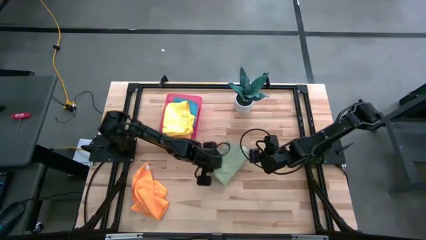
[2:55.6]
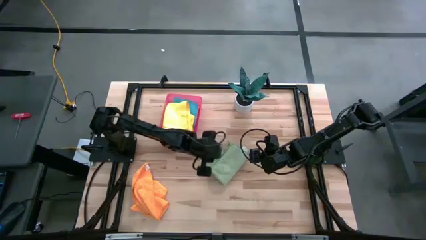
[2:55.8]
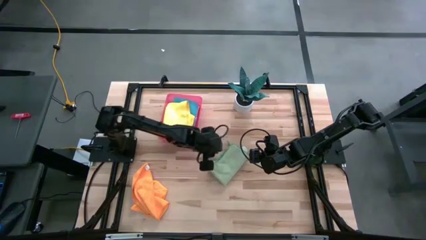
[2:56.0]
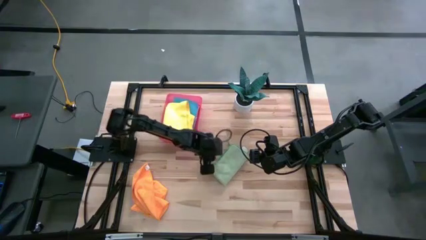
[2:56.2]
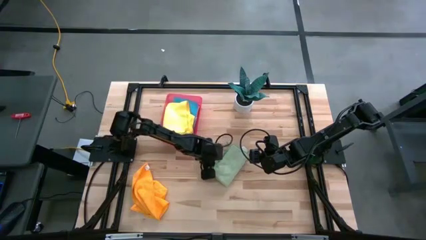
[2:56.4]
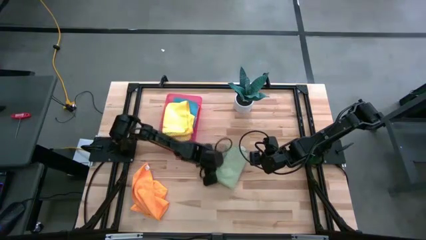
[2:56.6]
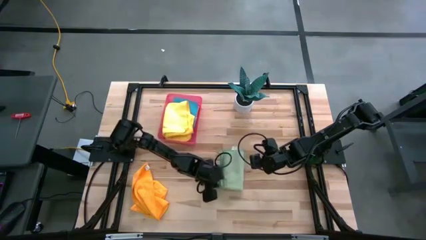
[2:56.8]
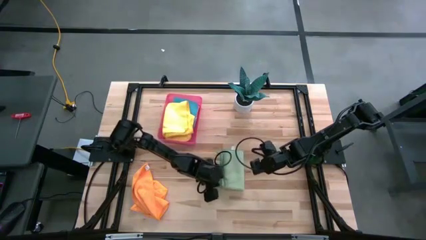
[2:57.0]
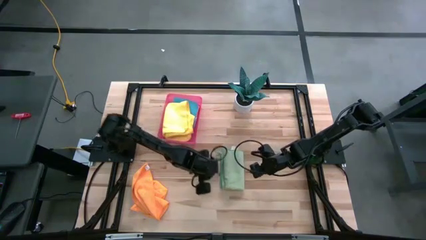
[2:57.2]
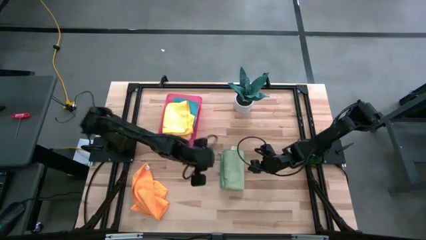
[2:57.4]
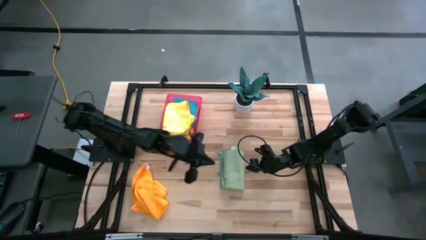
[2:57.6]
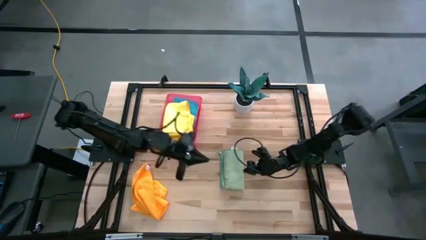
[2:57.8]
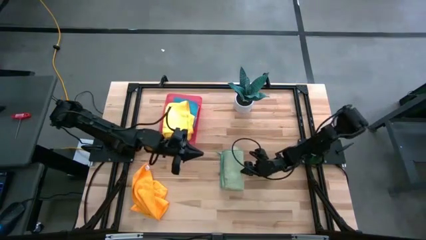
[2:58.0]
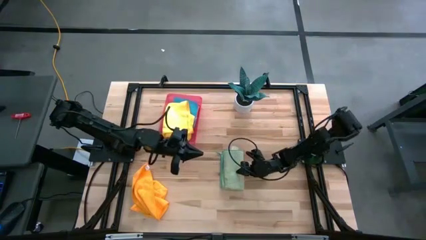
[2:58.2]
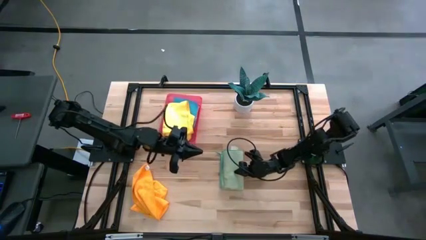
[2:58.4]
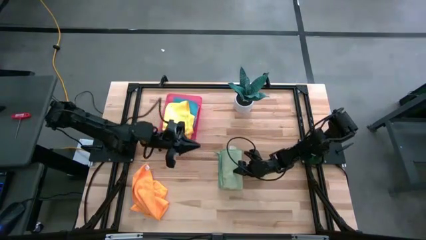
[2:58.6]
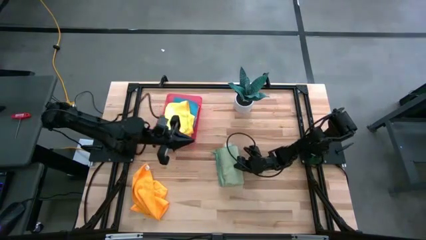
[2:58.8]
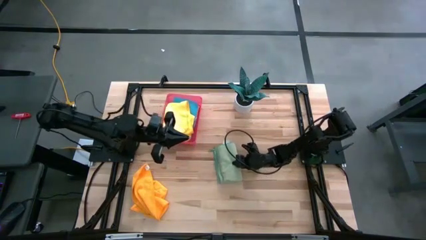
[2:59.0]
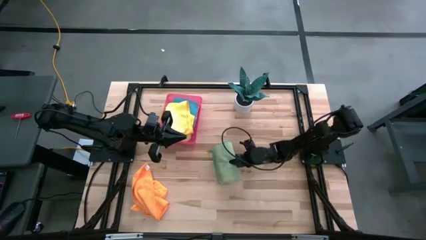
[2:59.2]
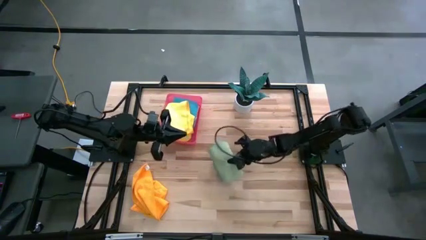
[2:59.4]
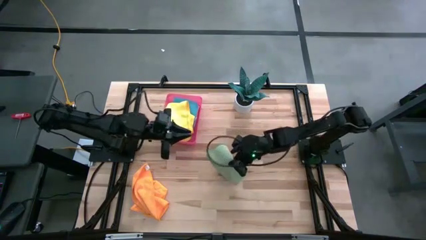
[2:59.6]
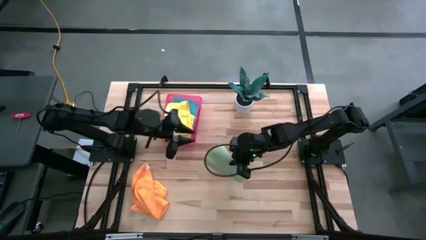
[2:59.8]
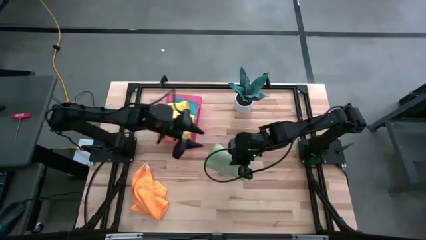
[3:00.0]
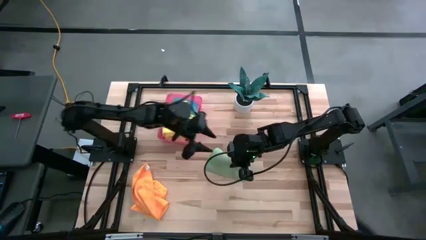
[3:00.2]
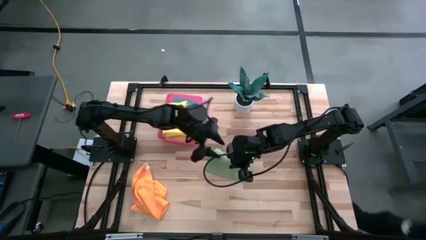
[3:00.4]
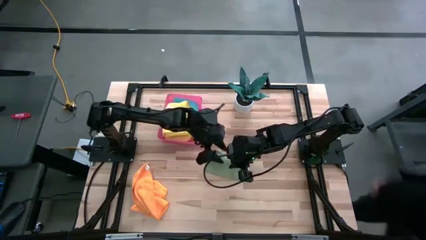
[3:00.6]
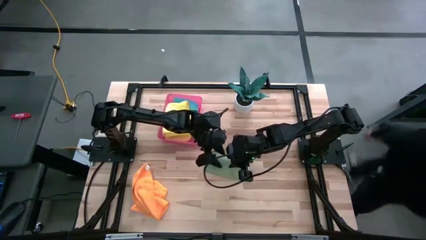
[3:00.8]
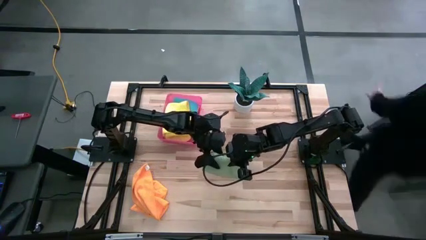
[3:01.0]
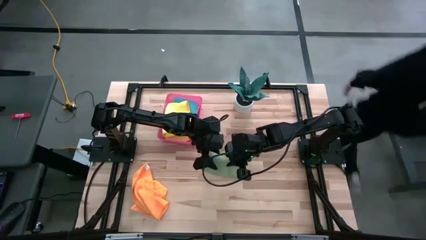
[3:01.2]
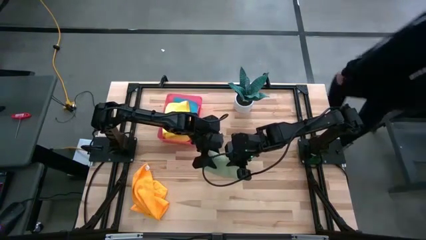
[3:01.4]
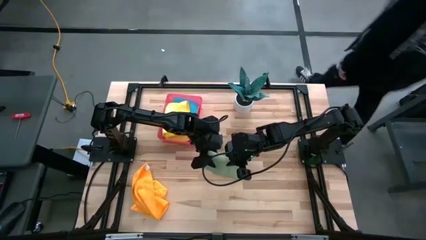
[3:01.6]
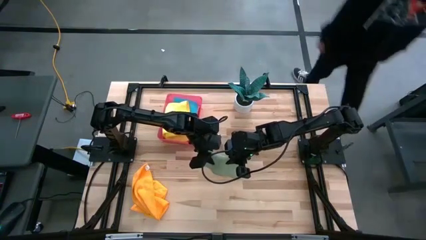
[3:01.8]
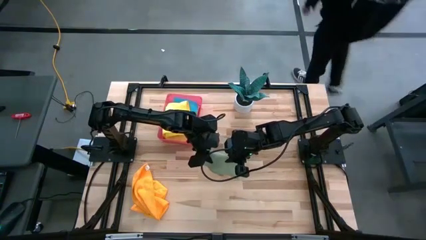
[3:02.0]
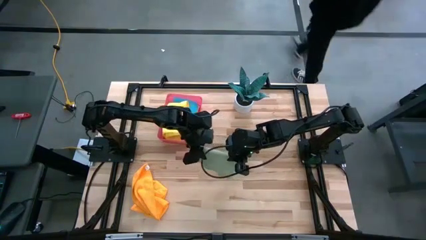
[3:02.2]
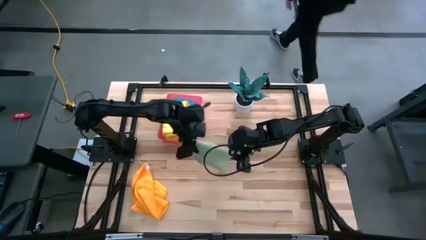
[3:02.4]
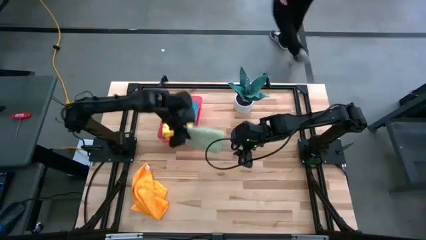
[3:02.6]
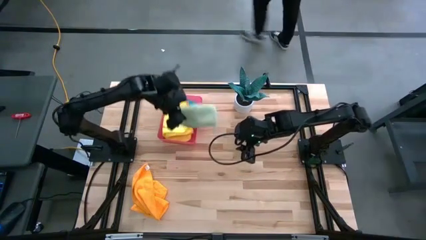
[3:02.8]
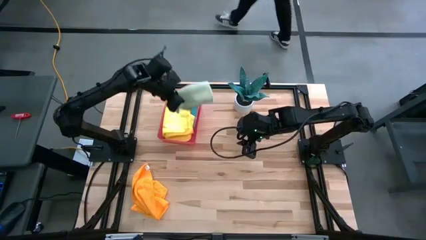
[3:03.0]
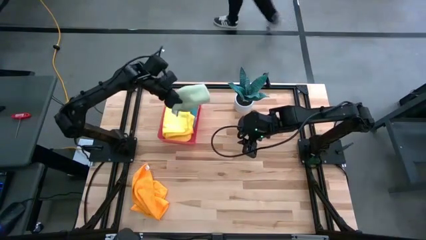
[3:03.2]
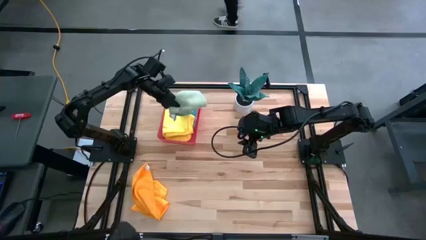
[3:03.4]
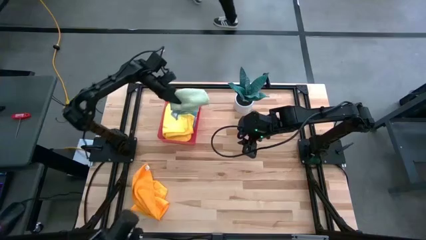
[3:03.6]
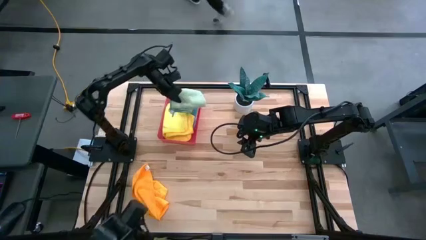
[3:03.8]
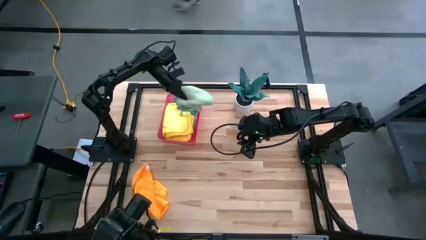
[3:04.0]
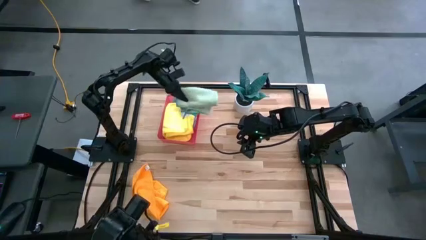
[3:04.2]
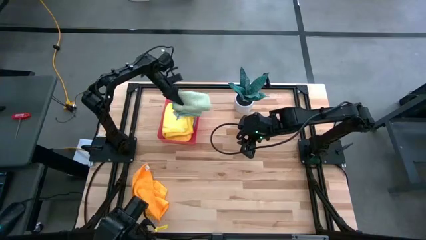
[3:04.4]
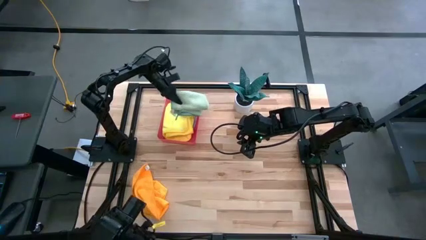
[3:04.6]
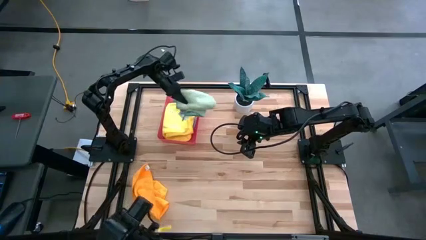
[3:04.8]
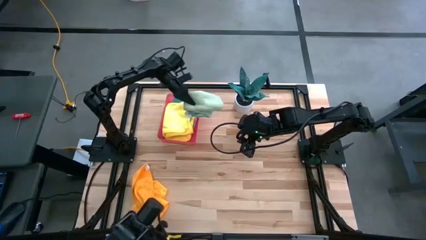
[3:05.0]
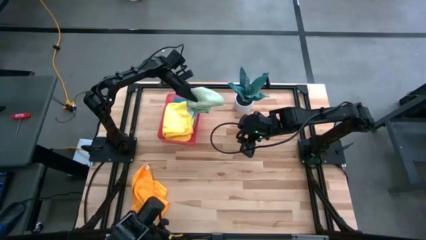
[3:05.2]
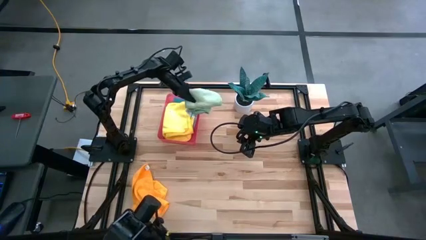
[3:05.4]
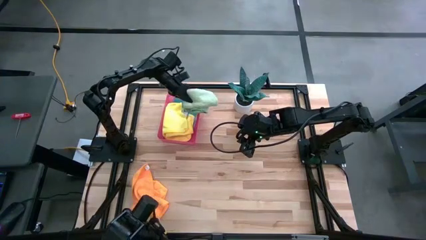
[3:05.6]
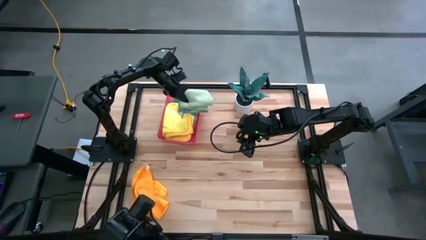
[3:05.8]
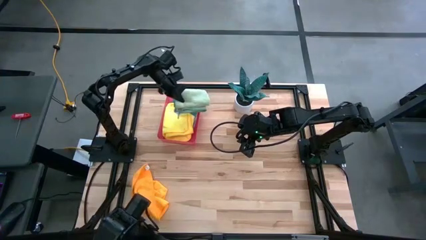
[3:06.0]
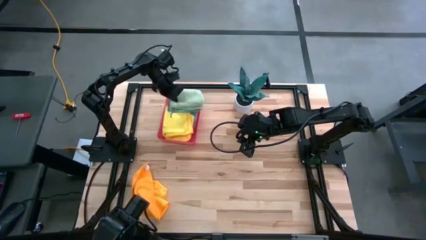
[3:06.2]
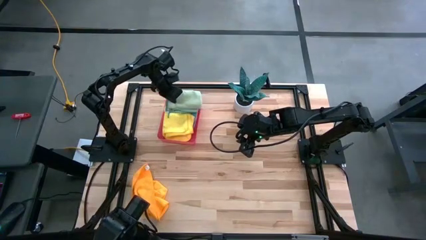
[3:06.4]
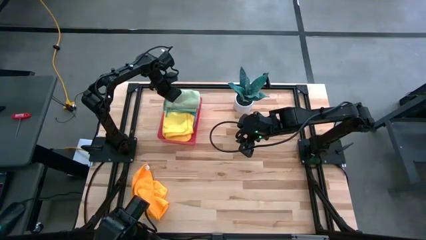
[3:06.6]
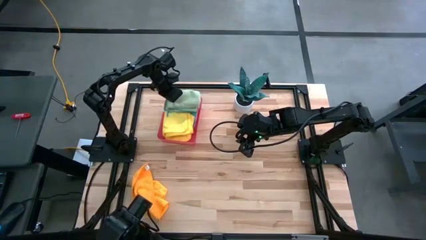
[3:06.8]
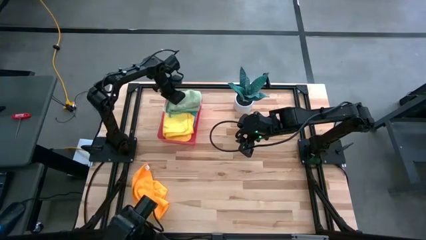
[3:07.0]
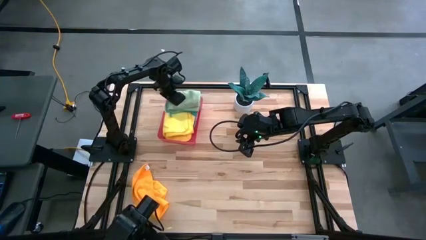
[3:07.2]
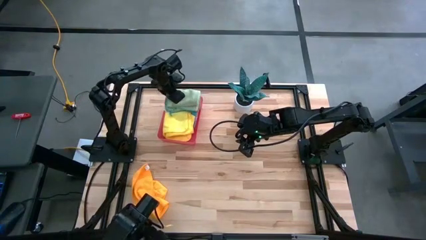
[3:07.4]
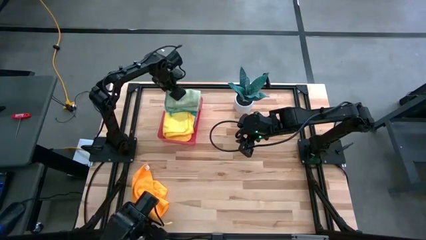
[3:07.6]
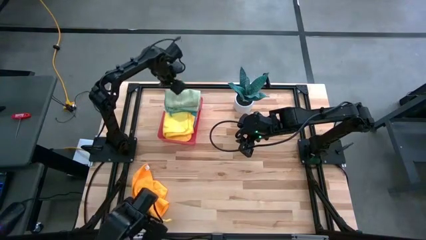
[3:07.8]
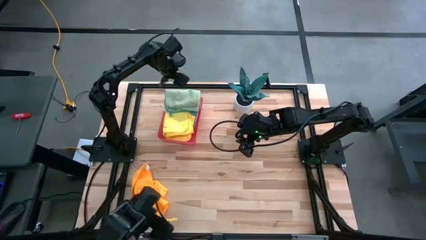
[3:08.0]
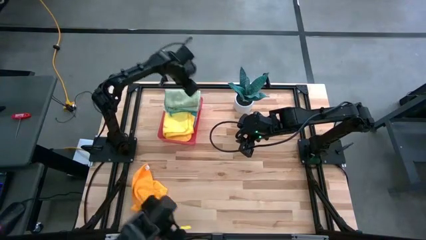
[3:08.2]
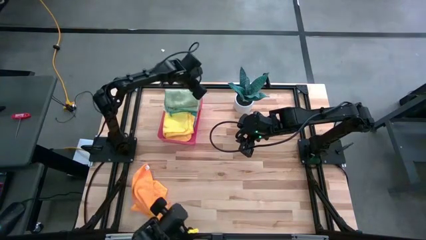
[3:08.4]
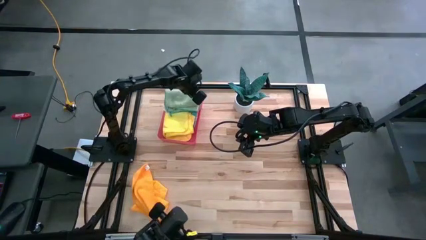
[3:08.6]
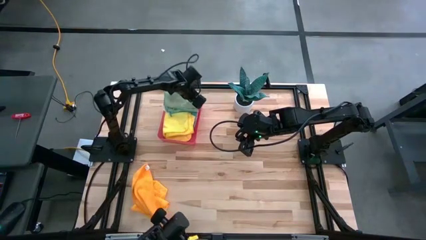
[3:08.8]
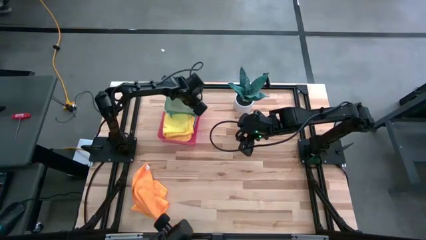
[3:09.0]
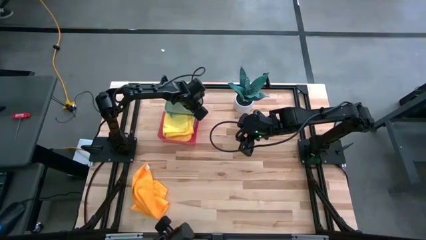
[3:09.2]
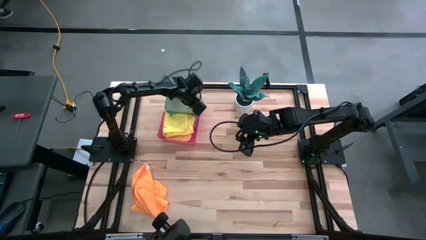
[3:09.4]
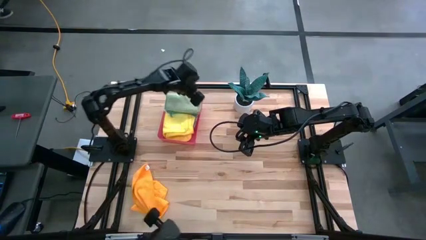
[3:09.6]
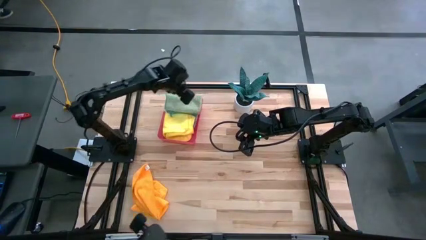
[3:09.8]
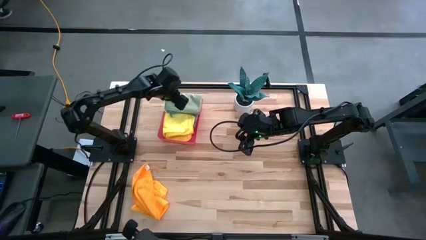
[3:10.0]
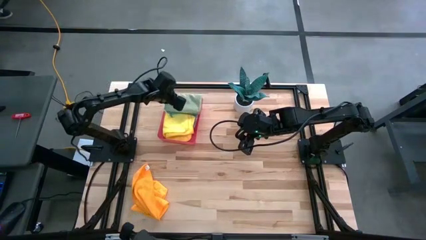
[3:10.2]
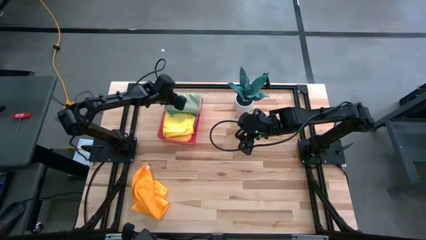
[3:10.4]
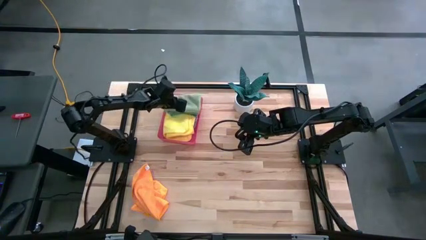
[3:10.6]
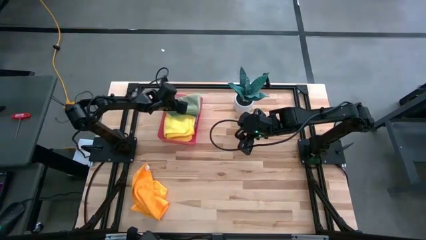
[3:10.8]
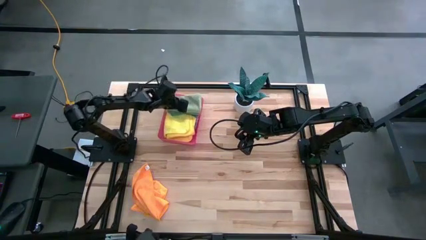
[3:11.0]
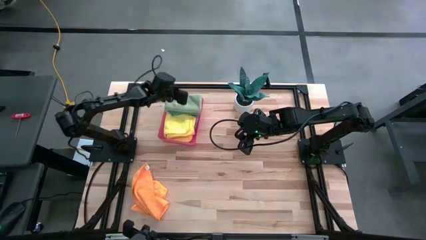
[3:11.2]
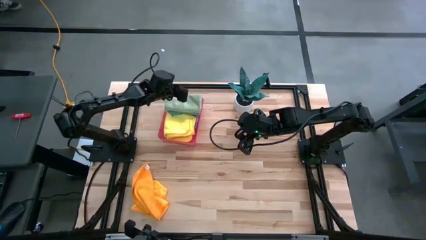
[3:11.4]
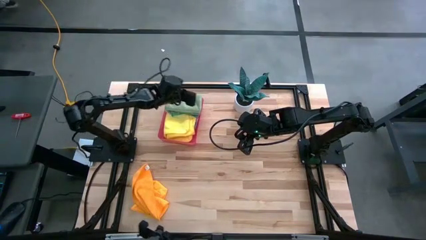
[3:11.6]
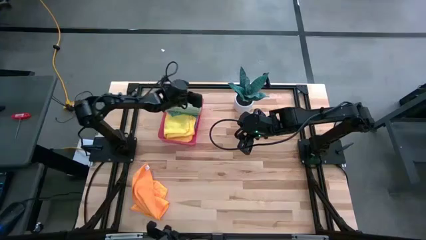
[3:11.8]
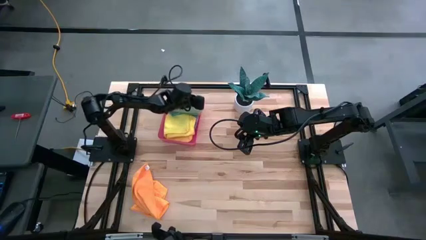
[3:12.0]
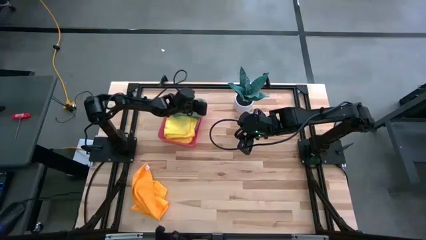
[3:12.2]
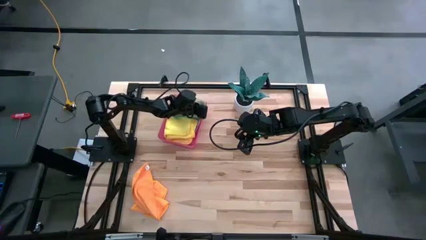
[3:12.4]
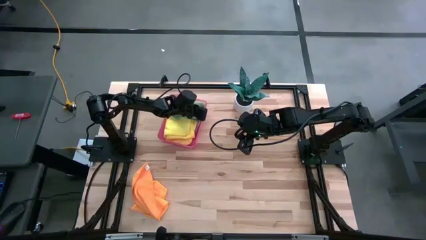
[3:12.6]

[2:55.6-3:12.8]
Task: Fold microfiber towels
Put the folded green microfiber towel into the pink bin
